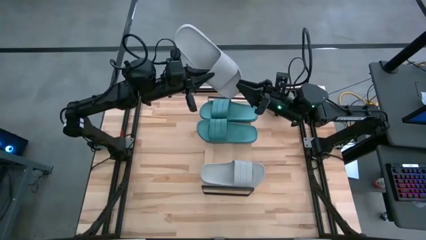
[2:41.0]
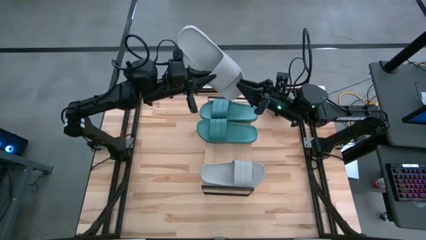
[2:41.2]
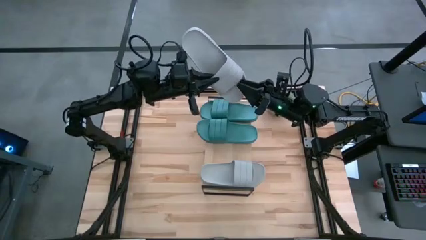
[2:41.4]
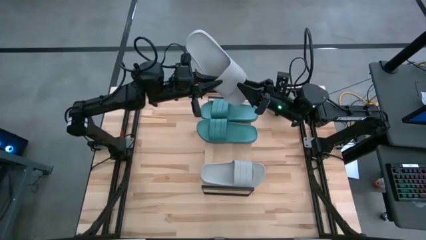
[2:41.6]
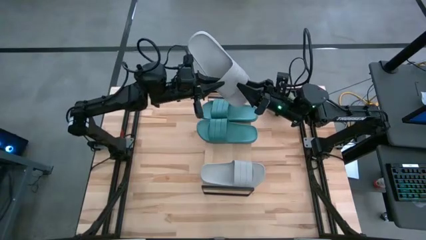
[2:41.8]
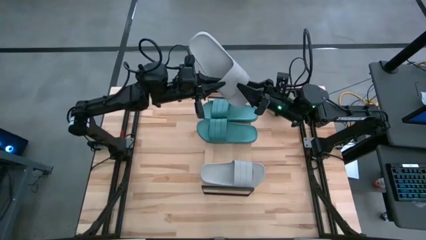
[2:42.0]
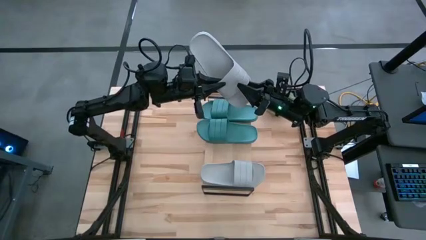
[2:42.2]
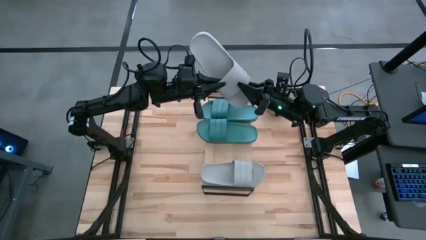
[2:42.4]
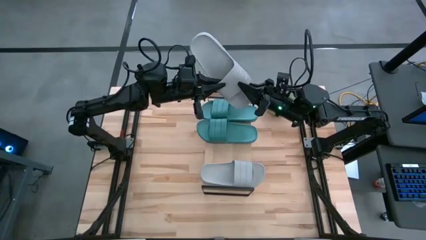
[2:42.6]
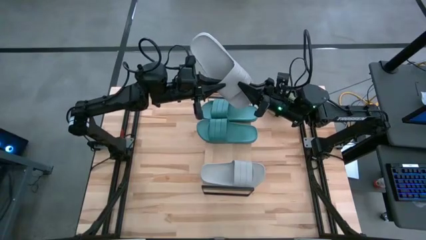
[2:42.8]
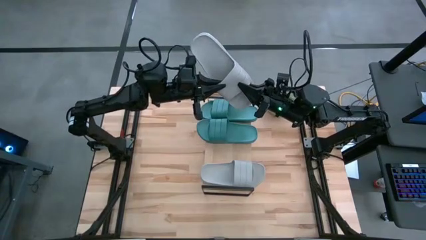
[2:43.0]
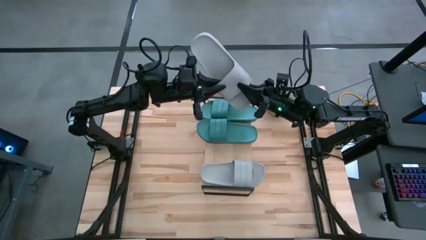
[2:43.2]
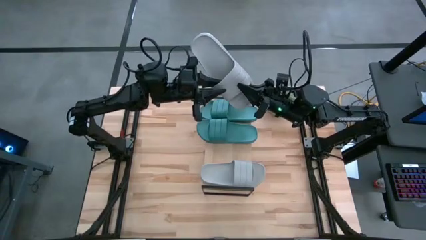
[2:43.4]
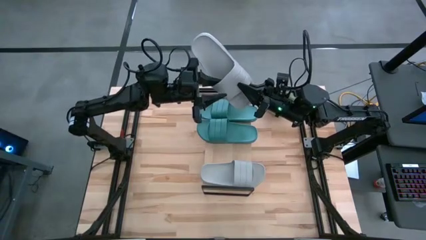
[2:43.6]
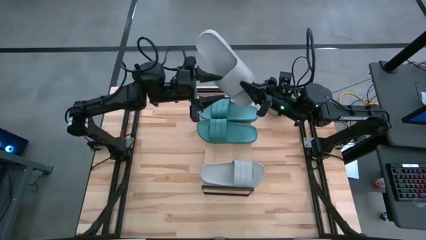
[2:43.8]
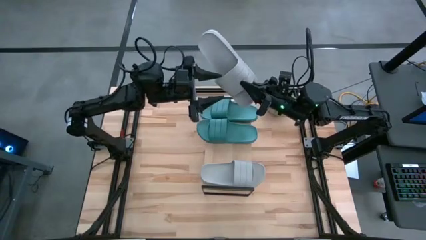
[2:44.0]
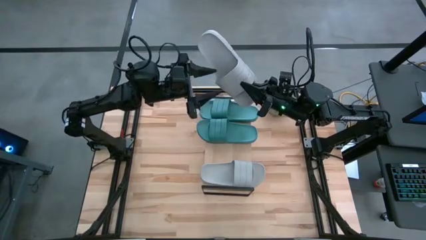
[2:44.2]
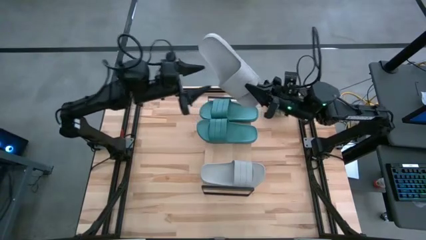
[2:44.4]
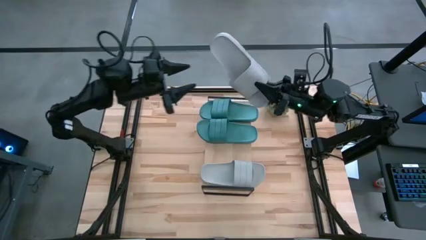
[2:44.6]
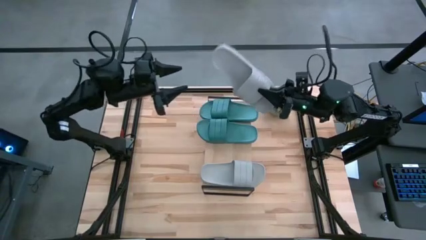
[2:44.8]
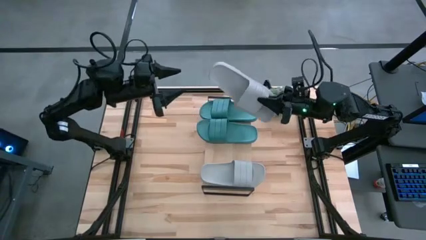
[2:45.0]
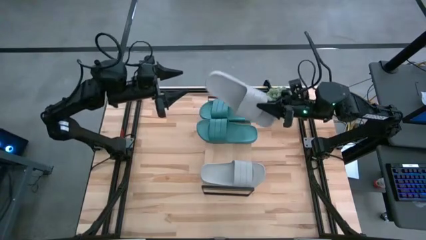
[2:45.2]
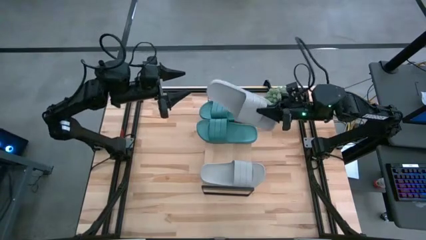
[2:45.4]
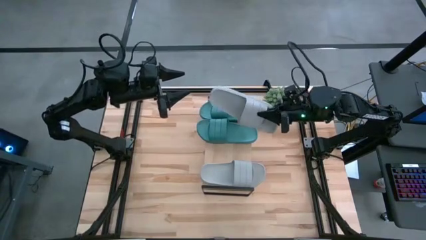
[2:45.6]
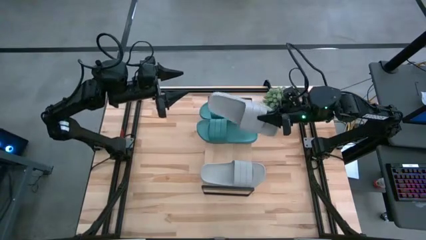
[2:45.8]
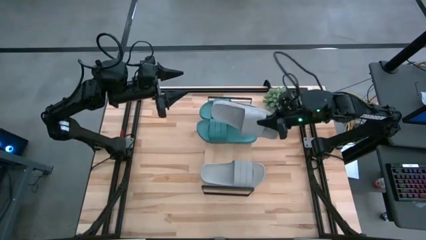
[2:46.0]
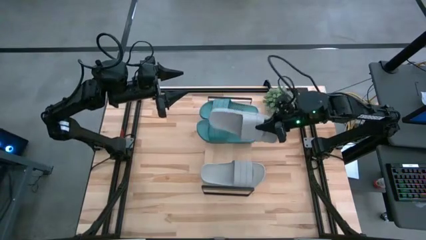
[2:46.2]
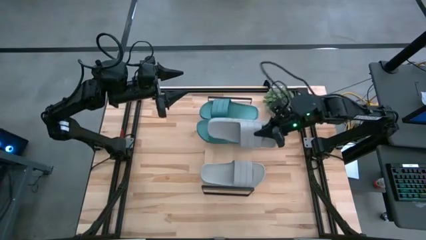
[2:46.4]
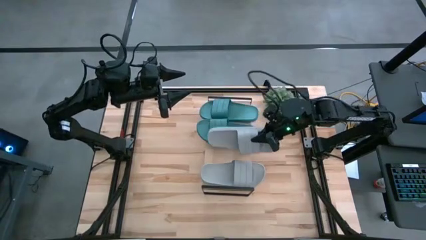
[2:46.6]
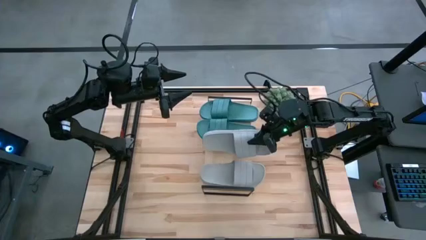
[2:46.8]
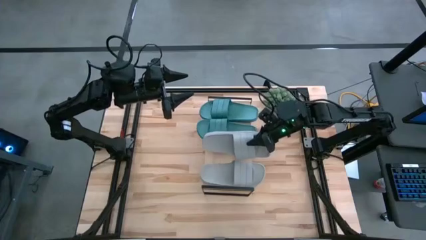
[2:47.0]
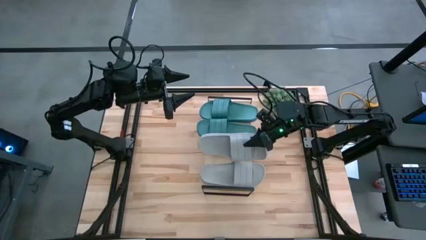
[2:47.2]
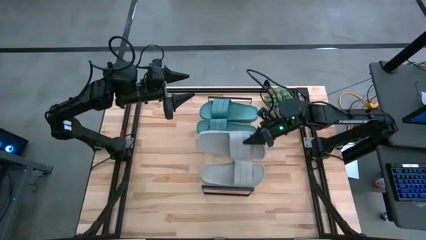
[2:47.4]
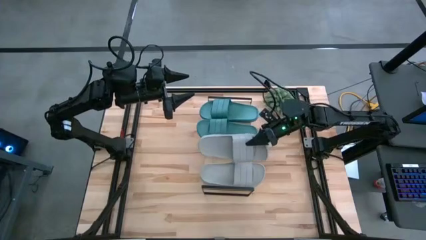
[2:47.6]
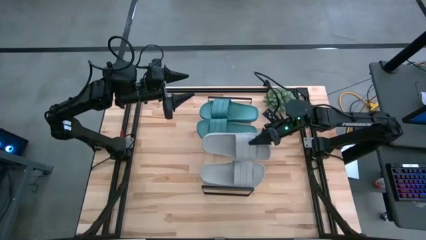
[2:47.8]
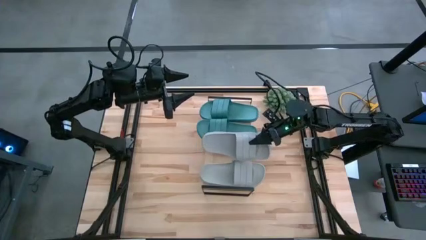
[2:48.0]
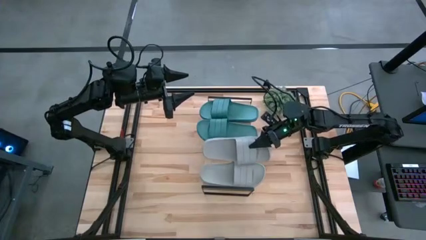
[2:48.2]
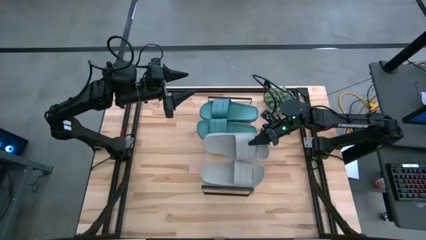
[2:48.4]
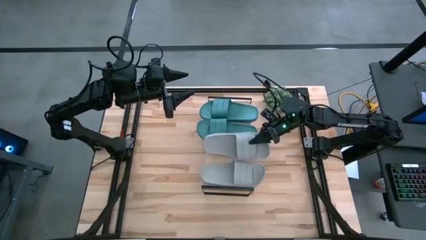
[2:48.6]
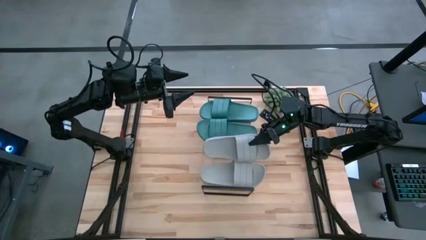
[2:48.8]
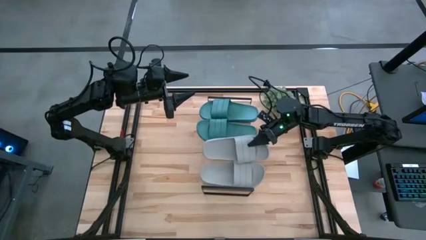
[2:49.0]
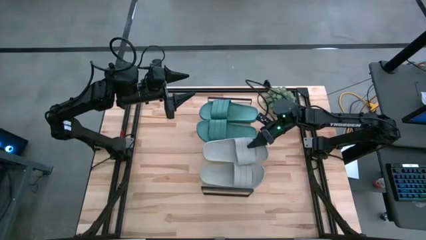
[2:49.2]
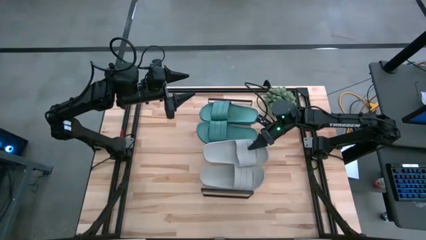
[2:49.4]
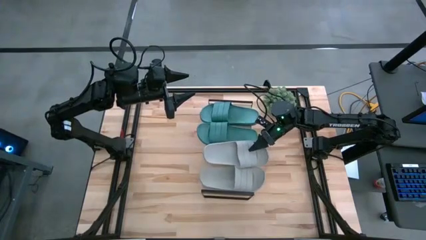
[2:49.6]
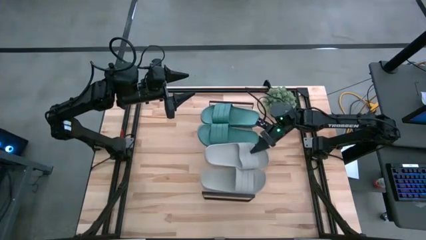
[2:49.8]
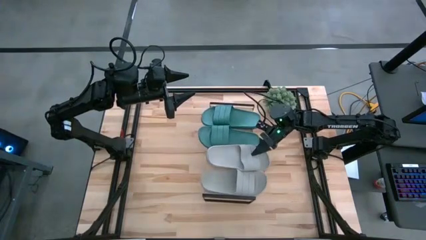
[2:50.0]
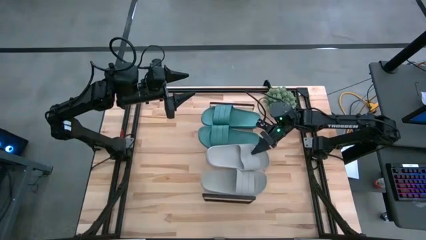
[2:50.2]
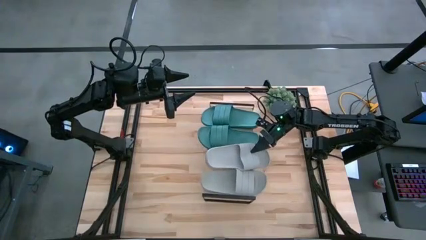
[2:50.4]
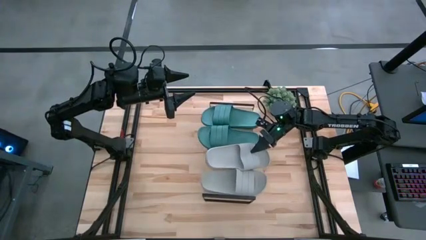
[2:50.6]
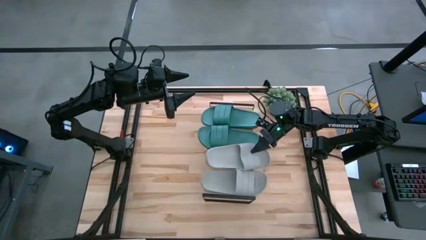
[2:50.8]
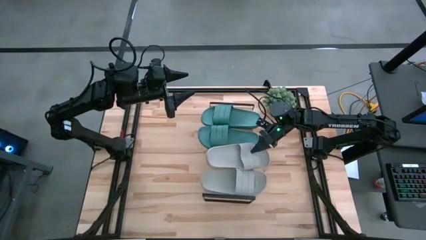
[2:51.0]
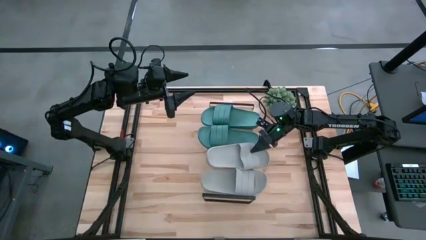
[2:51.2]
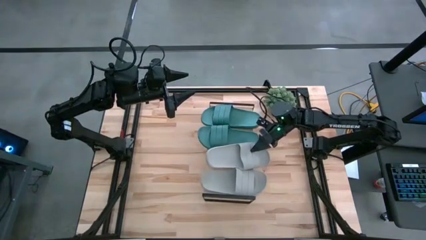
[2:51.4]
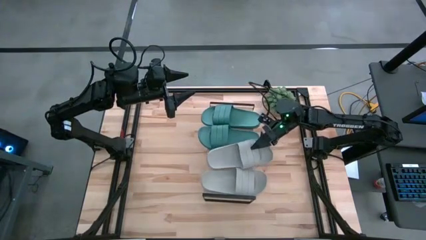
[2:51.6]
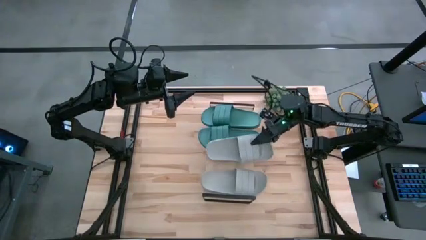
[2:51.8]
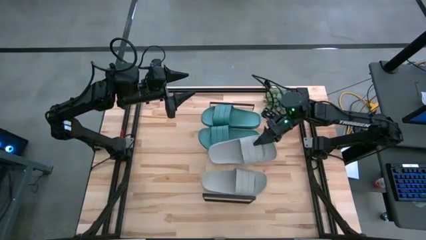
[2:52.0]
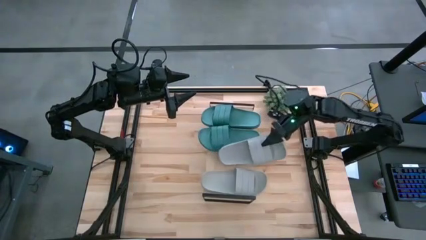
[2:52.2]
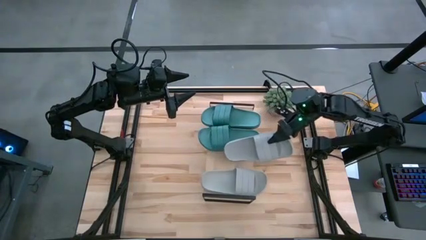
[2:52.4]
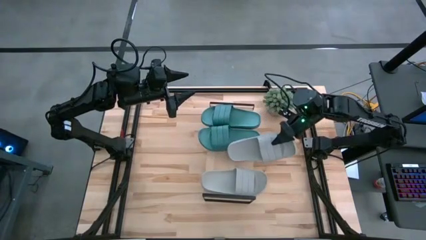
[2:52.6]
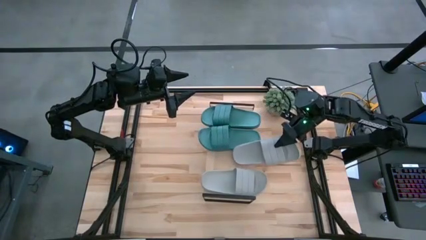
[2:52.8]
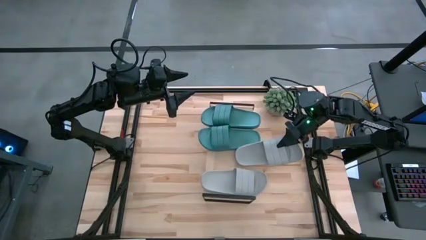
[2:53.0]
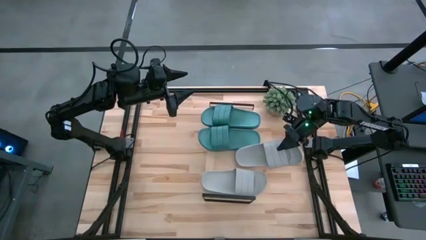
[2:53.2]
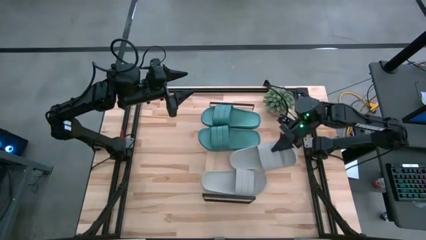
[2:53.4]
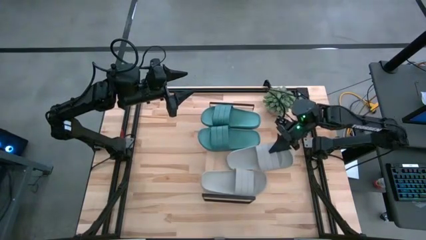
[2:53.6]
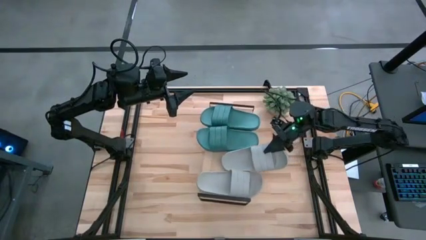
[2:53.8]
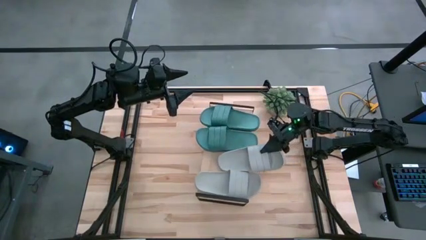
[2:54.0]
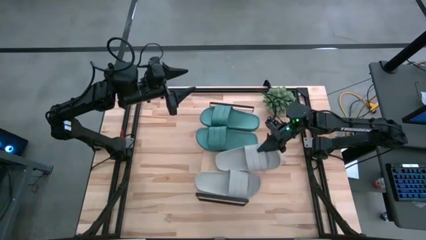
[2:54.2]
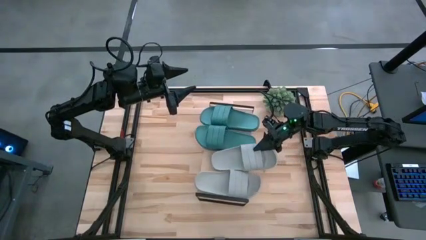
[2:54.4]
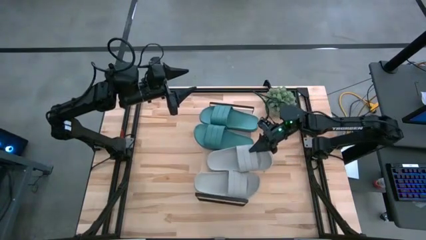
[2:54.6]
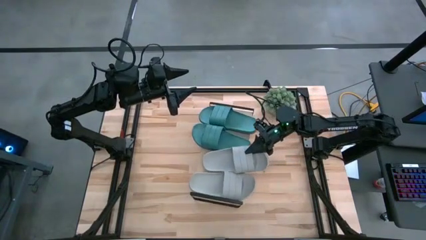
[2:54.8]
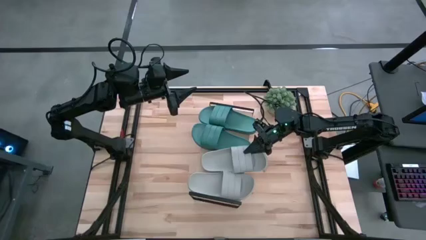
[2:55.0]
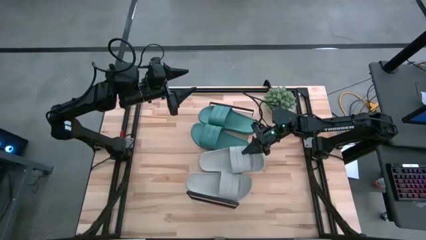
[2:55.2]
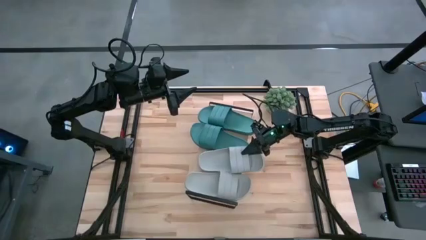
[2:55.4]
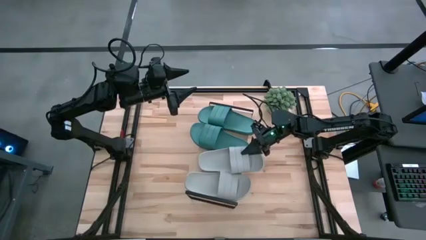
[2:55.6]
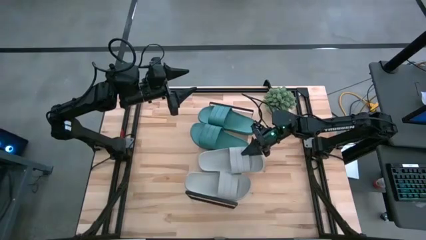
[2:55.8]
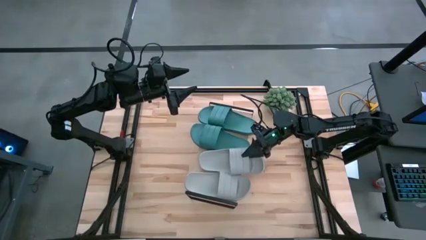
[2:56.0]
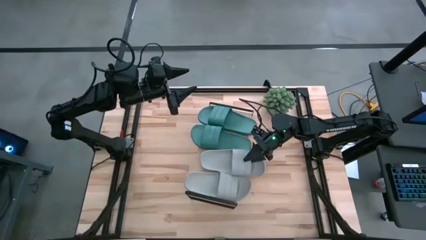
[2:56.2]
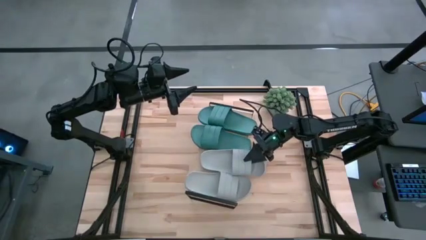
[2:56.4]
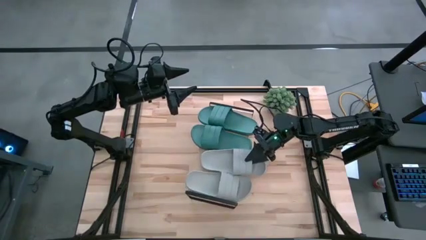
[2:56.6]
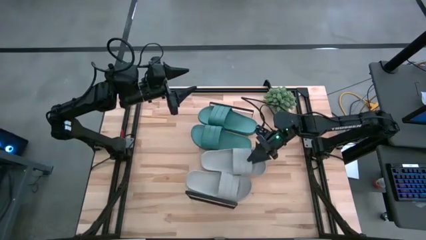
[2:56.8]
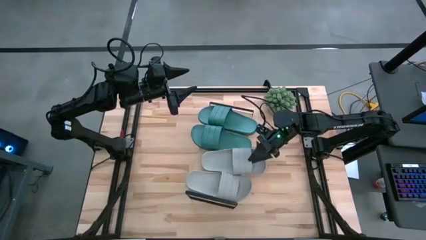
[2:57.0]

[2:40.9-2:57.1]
Task: Pick and place slides into the shelf
Put the gray slide on the shelf
